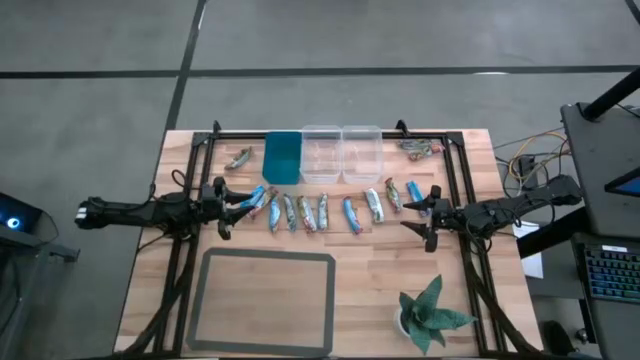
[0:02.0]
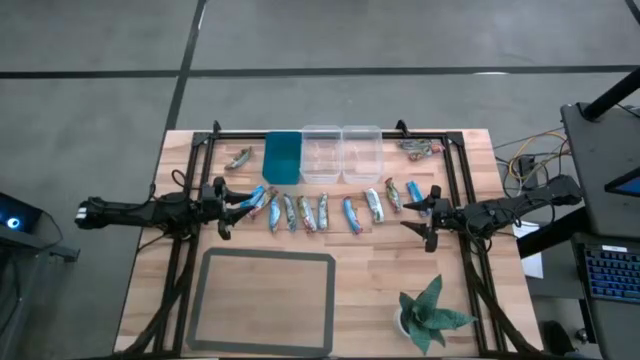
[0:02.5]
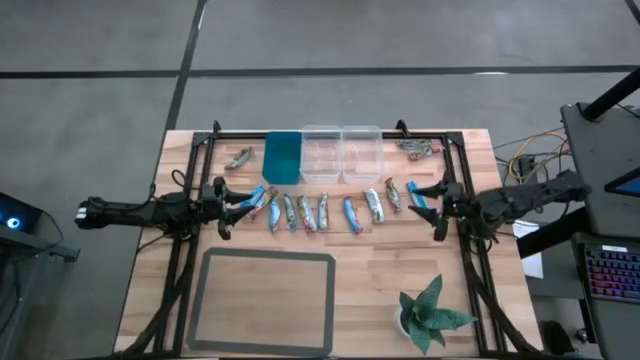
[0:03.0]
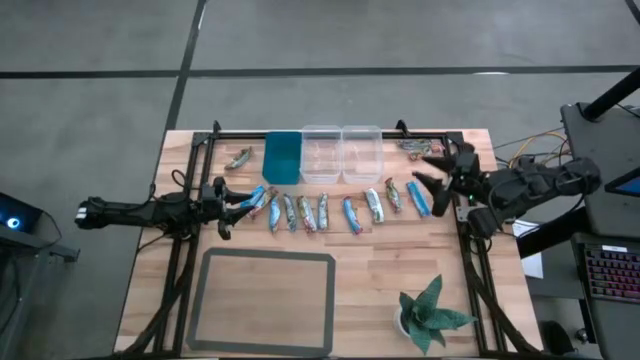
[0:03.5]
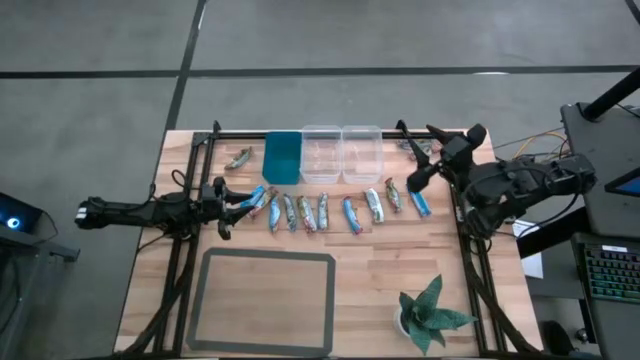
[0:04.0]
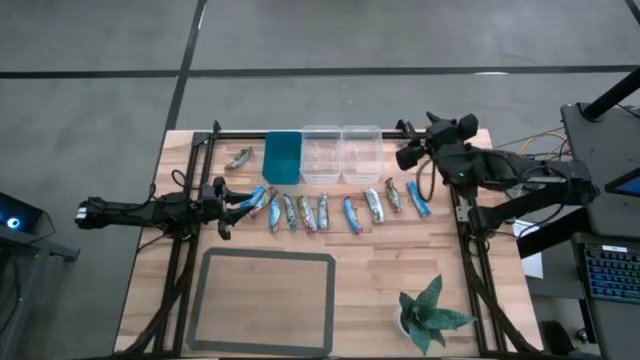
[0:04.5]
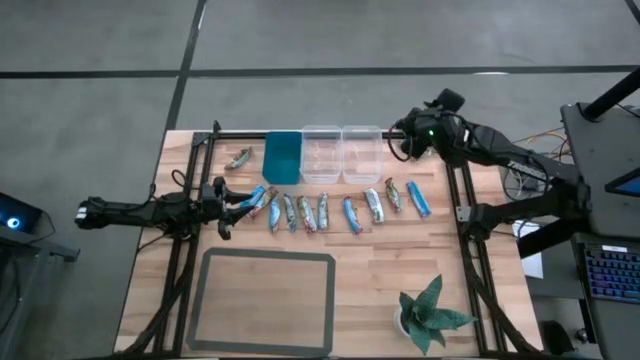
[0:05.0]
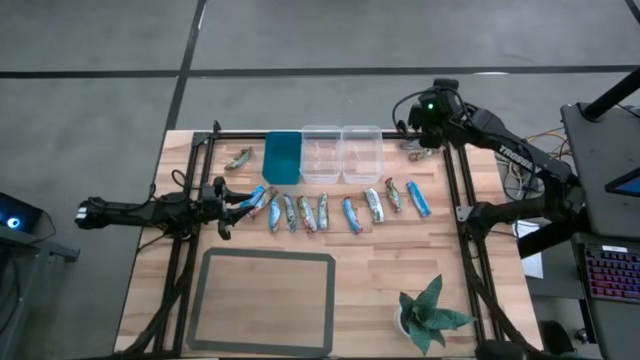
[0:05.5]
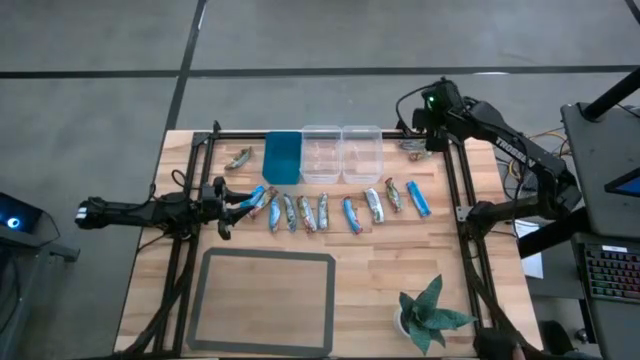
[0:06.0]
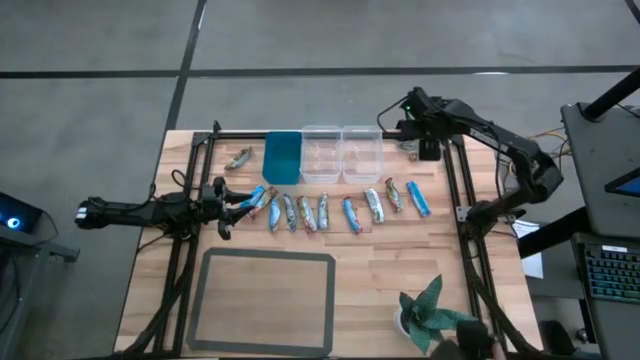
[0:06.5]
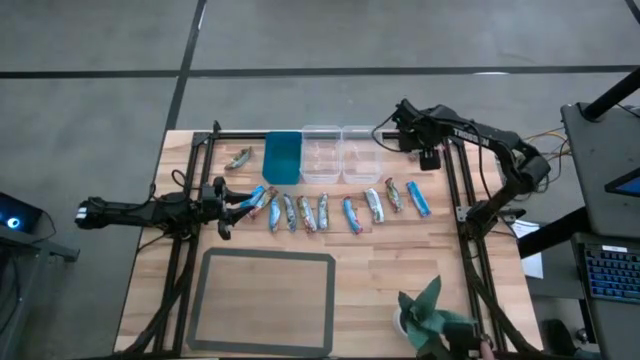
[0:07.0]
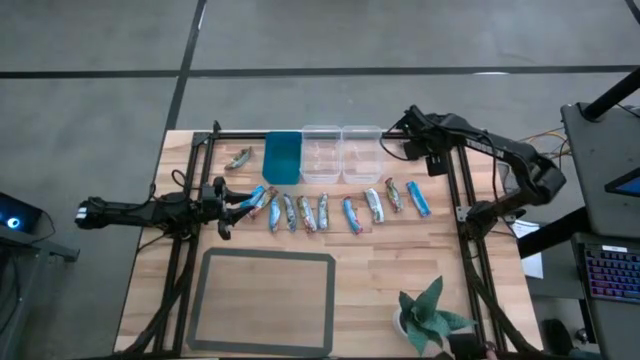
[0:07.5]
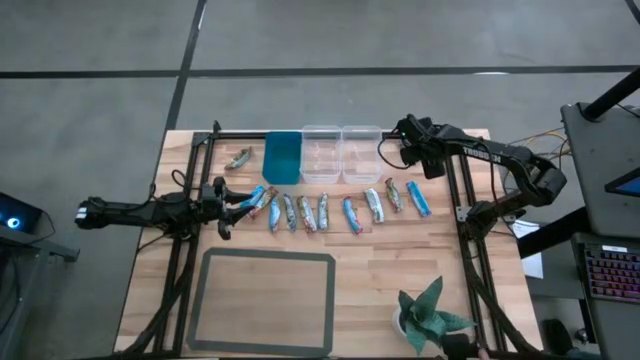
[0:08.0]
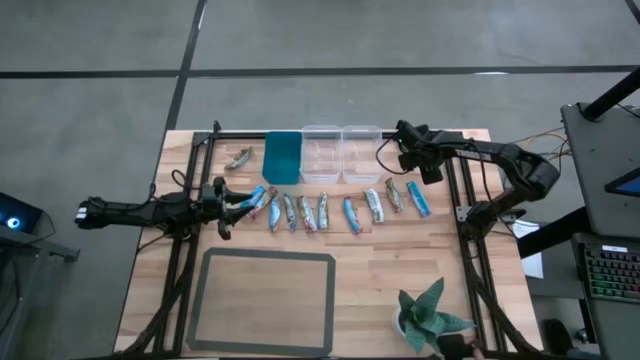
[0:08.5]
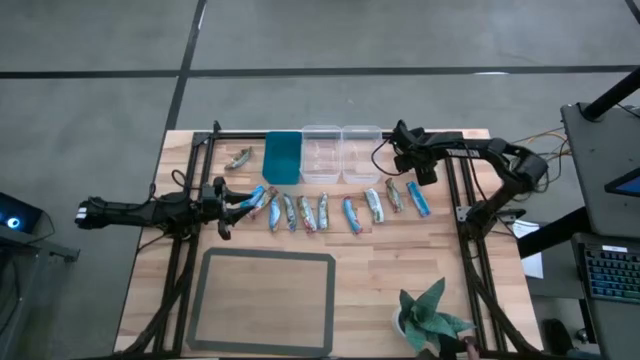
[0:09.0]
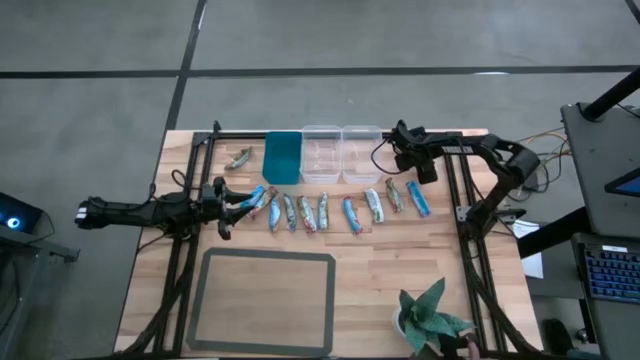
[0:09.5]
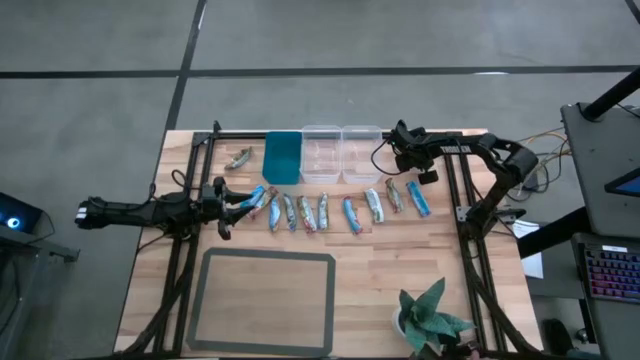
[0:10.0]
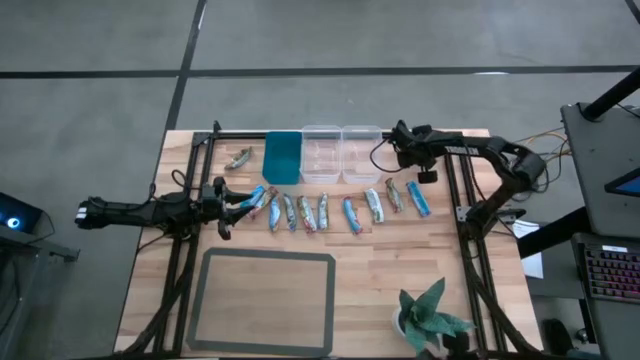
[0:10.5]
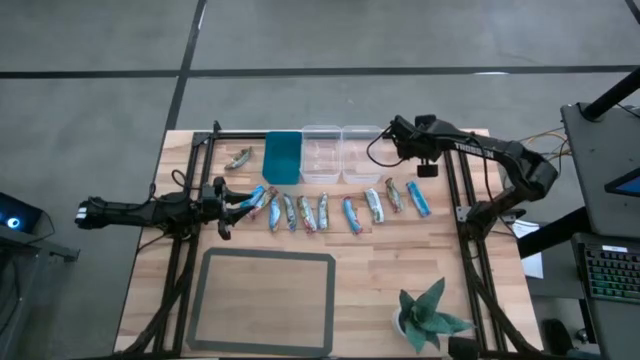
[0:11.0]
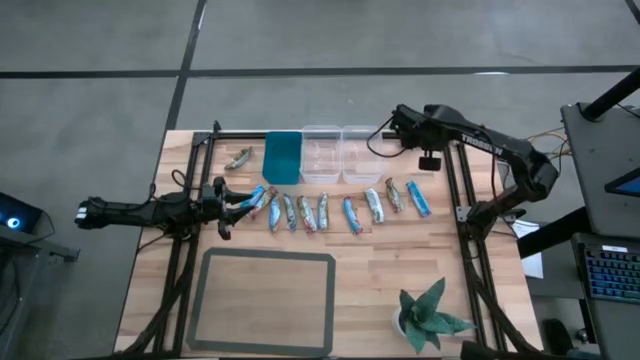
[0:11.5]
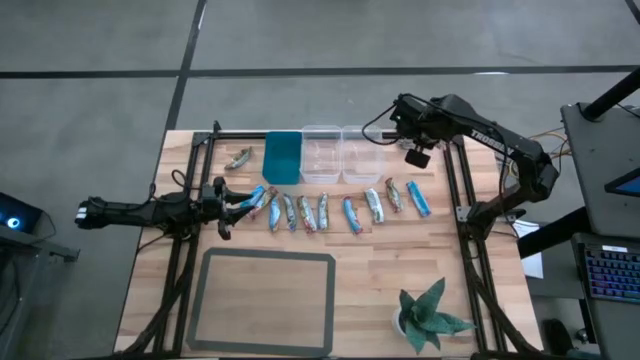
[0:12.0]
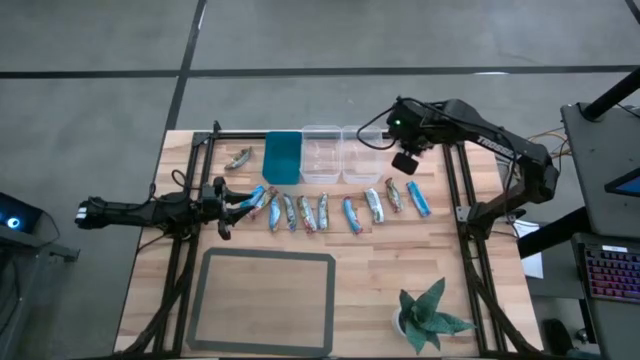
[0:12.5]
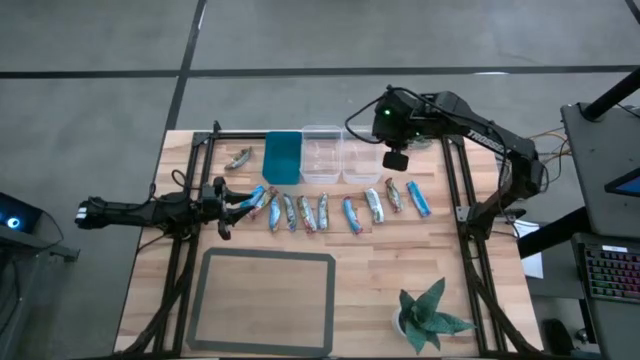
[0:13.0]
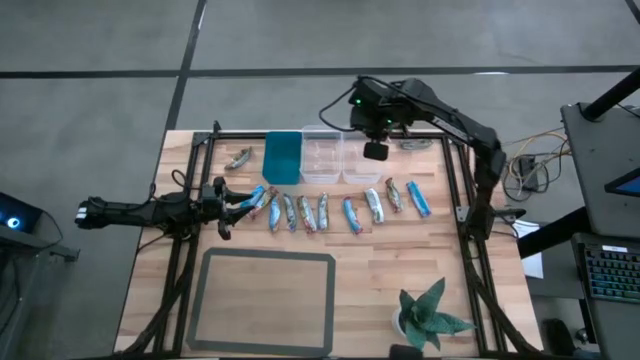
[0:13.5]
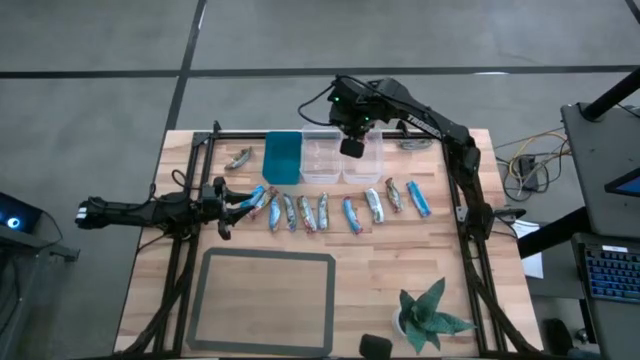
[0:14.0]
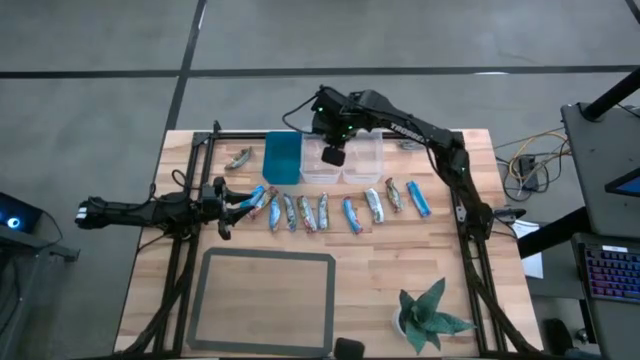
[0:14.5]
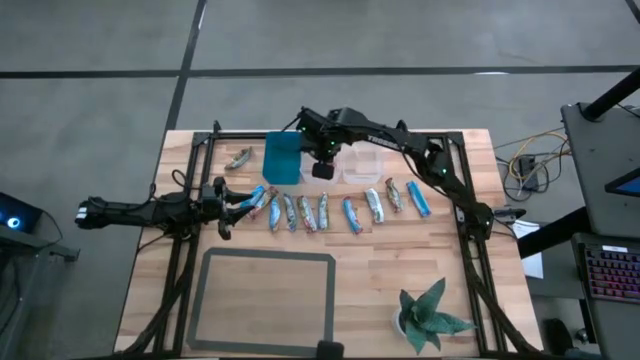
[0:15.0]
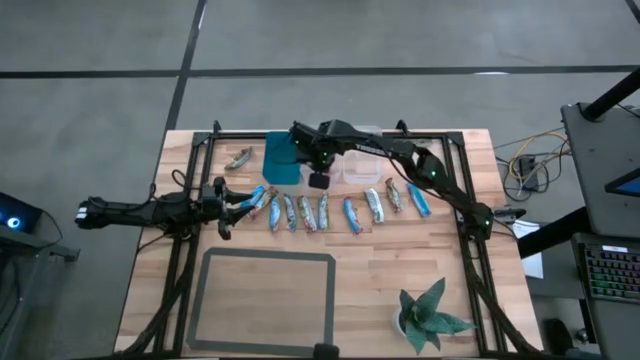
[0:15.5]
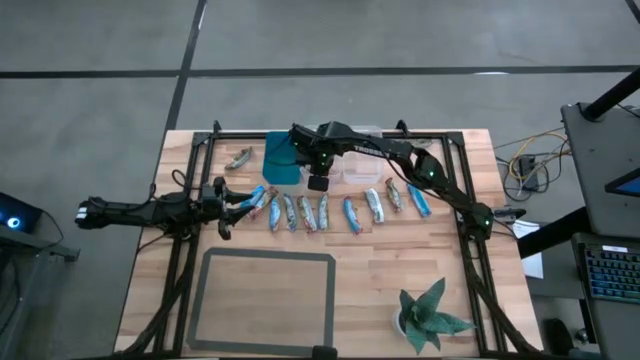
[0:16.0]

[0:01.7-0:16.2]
Task: Pick and place Granola Bars by type
Put the red granola bar into the left transparent bin

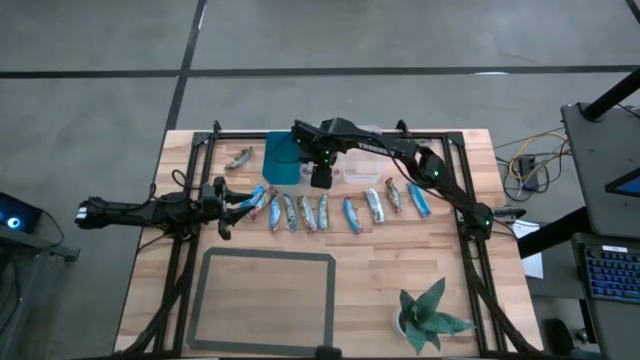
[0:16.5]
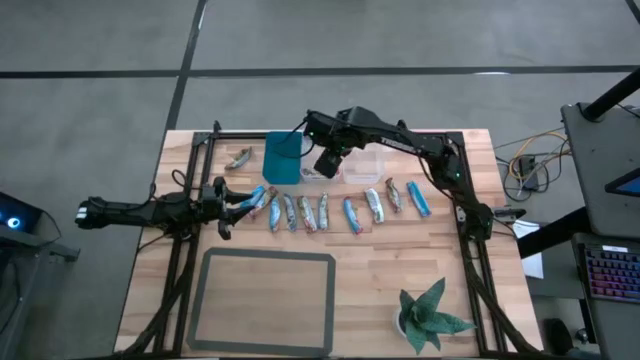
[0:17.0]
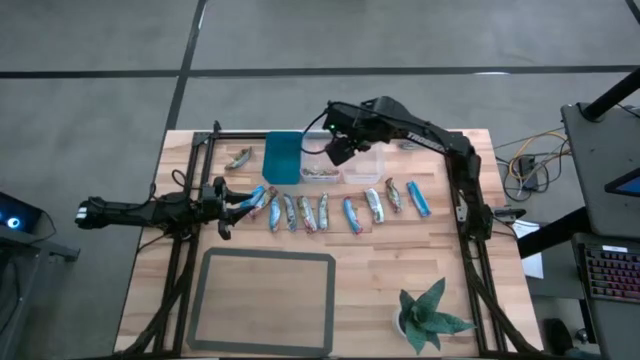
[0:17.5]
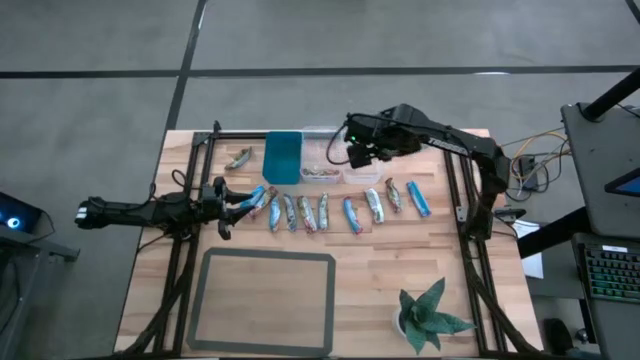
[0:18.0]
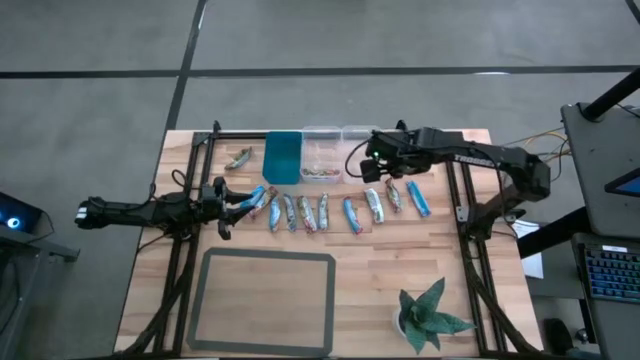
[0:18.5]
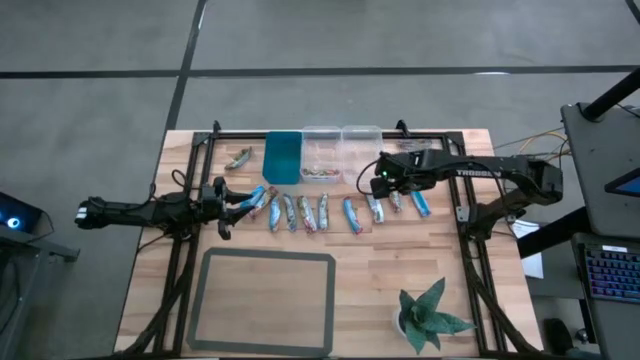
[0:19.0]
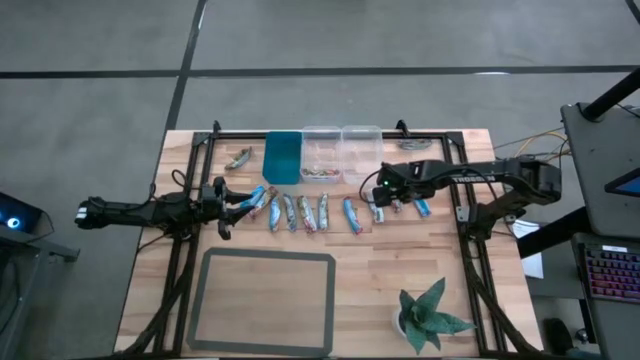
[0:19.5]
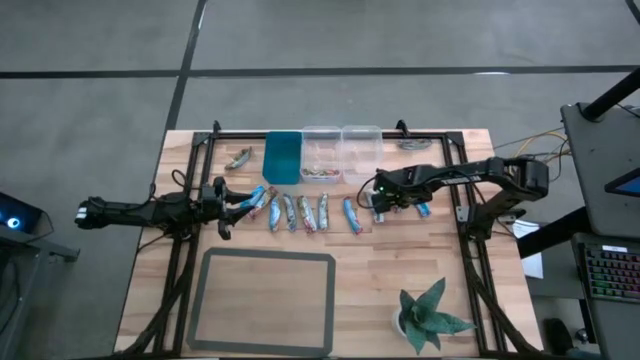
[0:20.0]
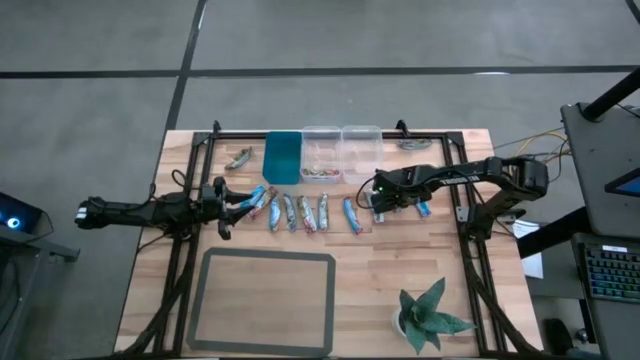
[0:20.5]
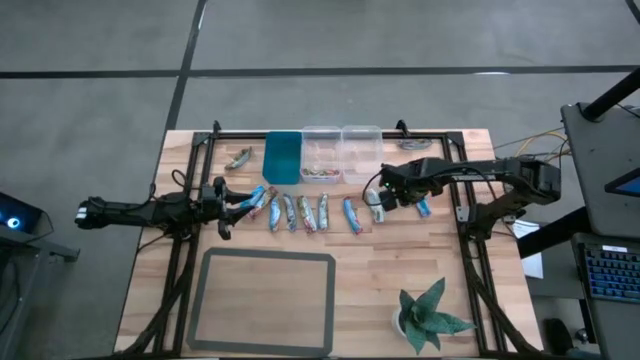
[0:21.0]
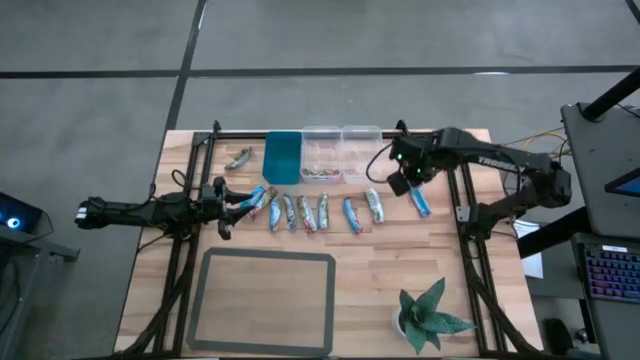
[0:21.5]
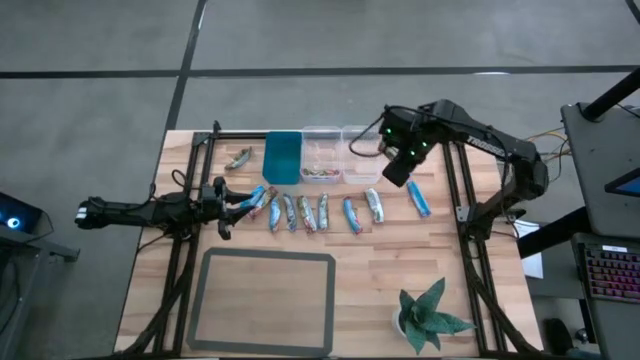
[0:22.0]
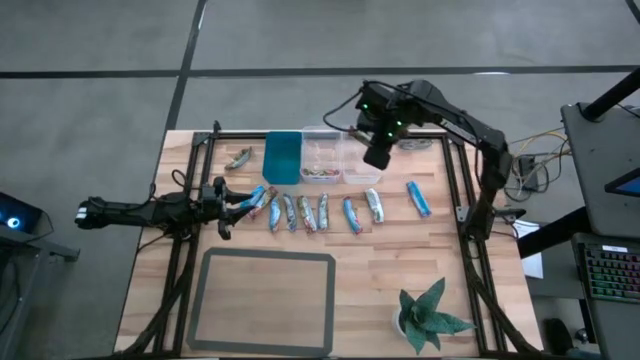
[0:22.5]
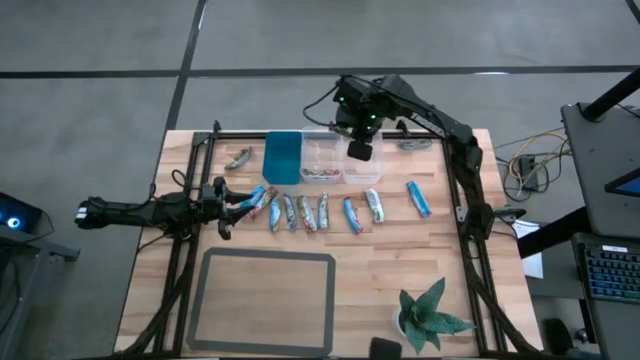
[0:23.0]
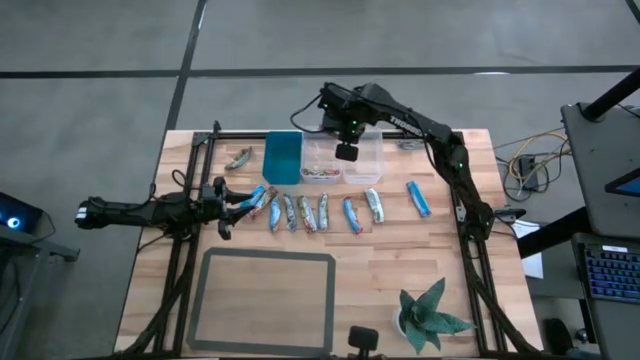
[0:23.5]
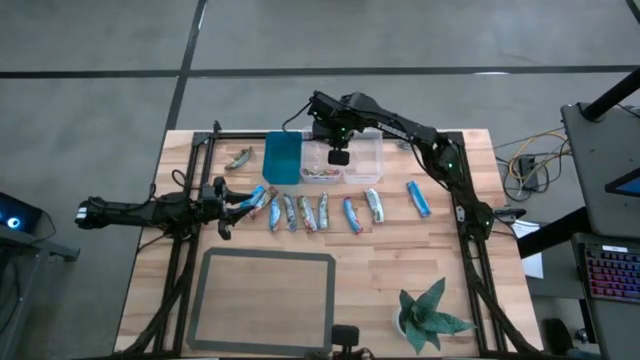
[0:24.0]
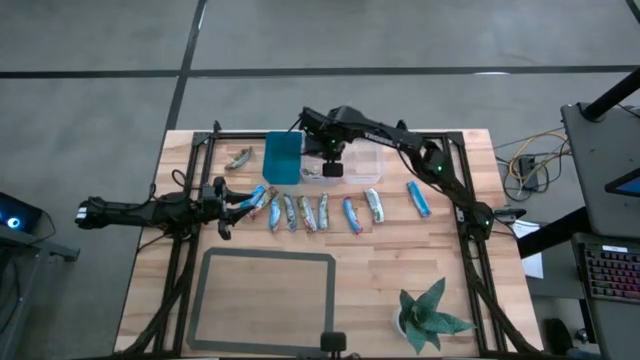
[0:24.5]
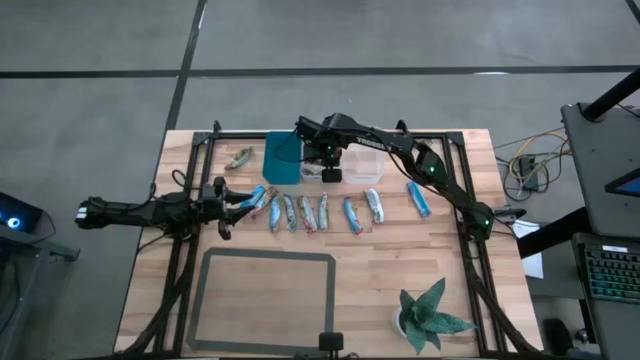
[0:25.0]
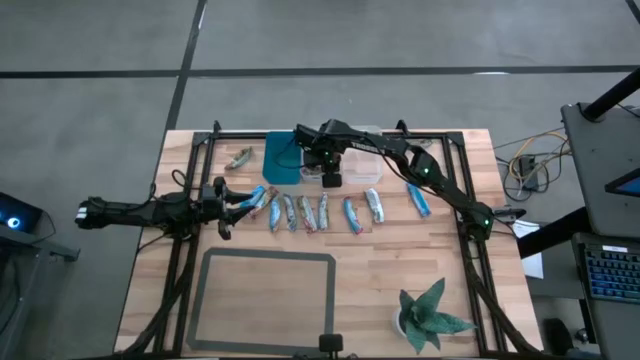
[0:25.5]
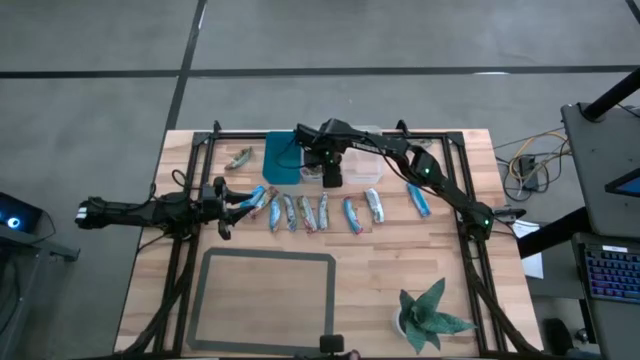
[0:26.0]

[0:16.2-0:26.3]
Put the red granola bar into the left transparent bin
